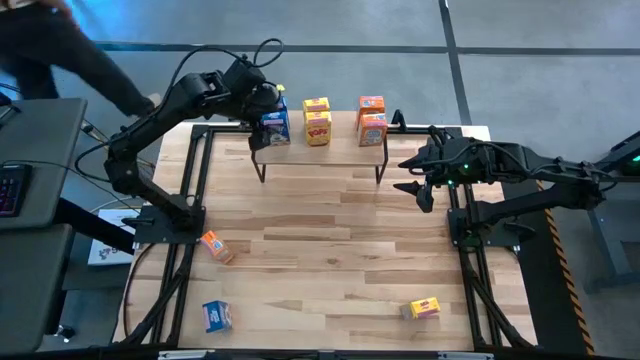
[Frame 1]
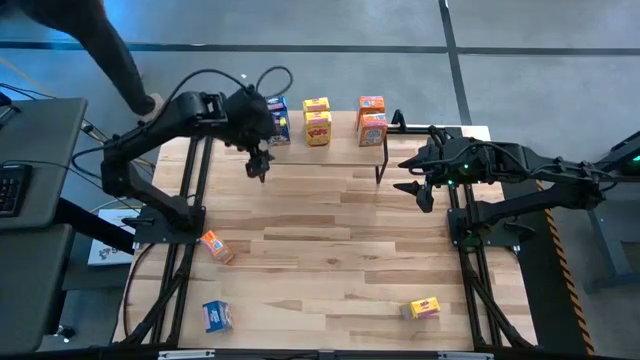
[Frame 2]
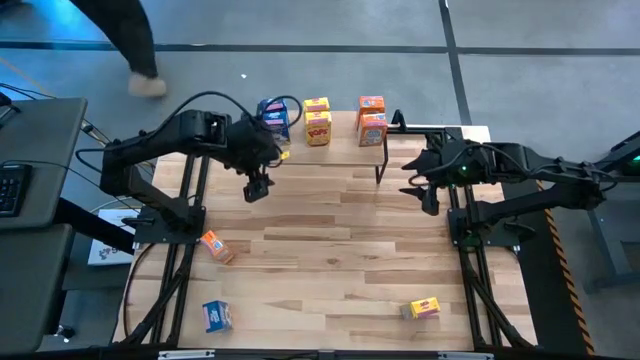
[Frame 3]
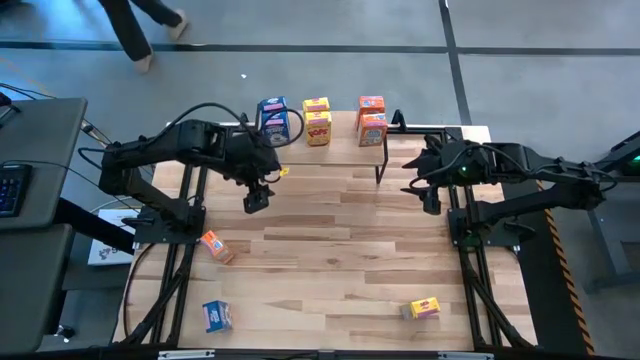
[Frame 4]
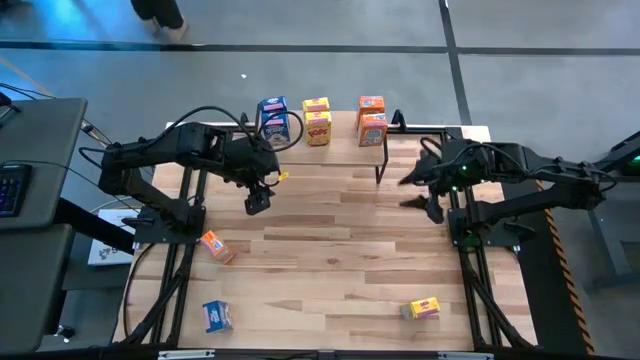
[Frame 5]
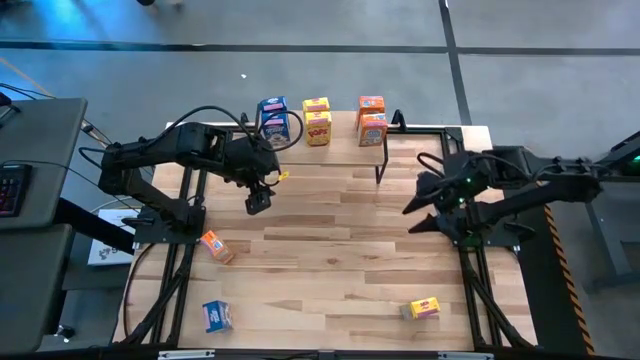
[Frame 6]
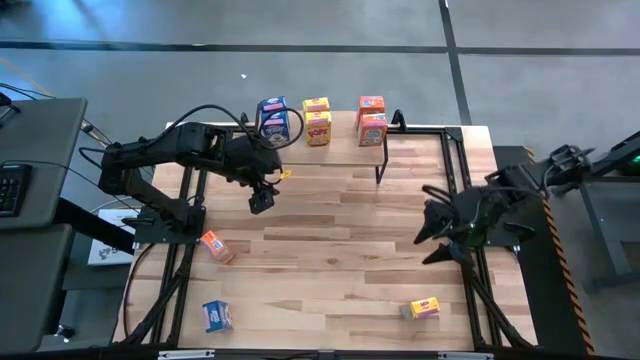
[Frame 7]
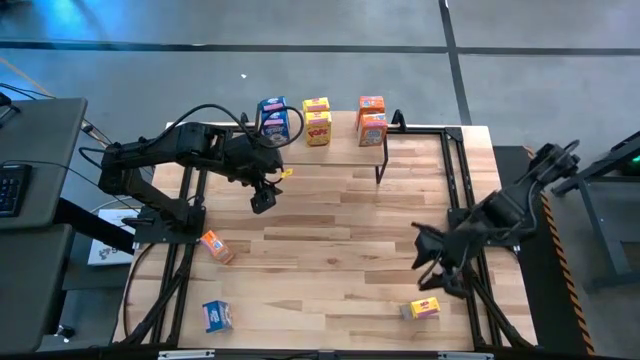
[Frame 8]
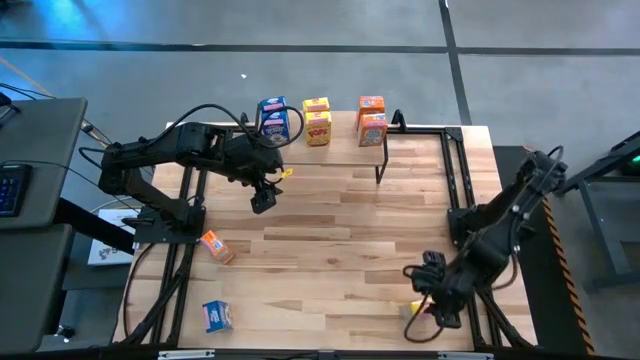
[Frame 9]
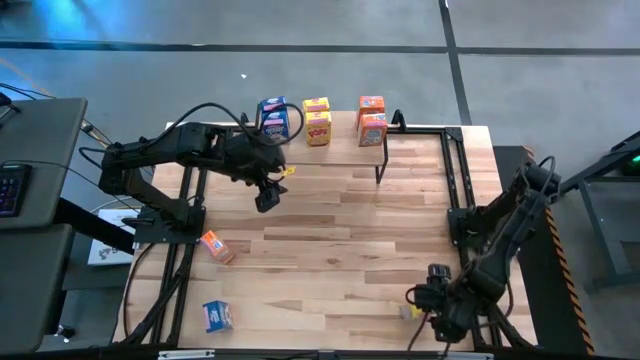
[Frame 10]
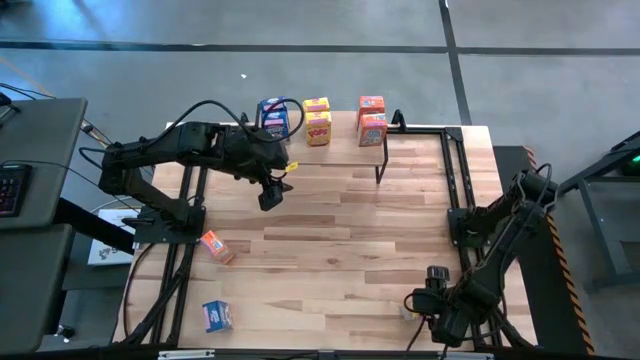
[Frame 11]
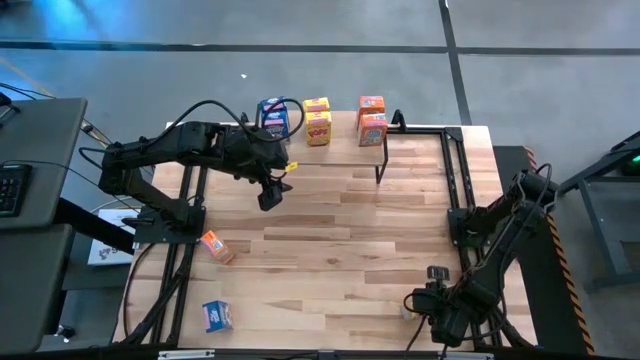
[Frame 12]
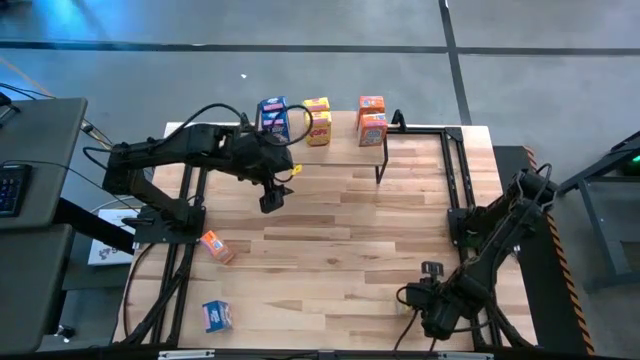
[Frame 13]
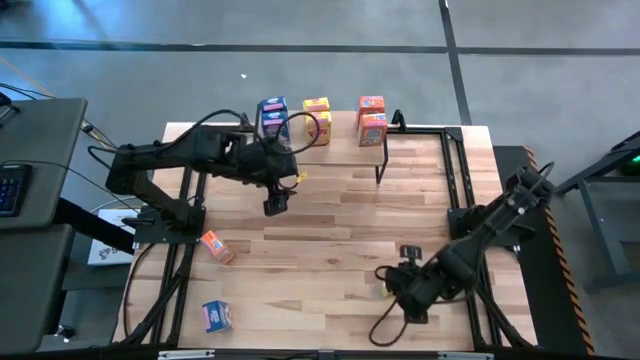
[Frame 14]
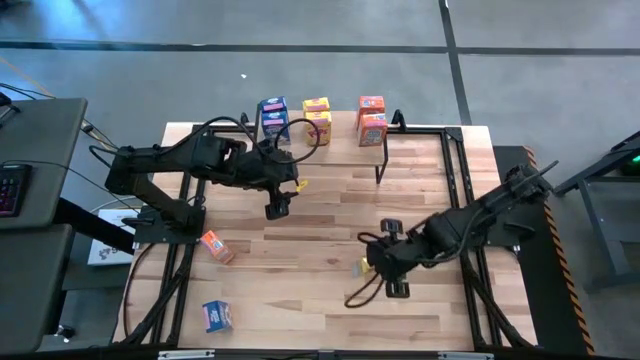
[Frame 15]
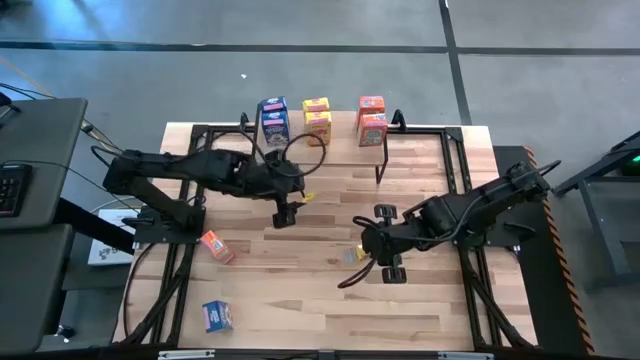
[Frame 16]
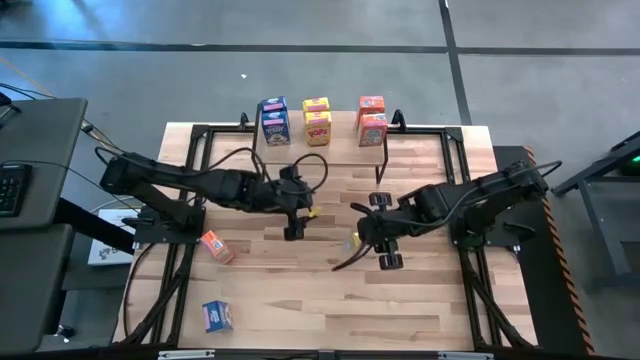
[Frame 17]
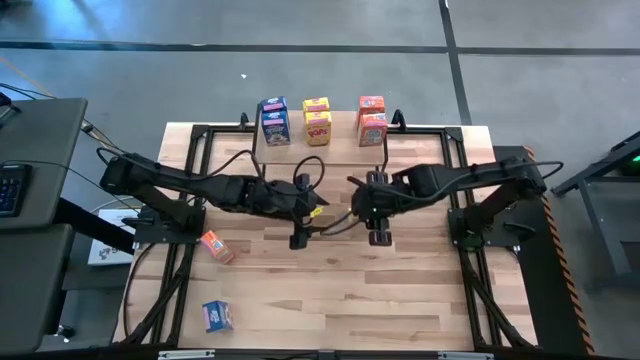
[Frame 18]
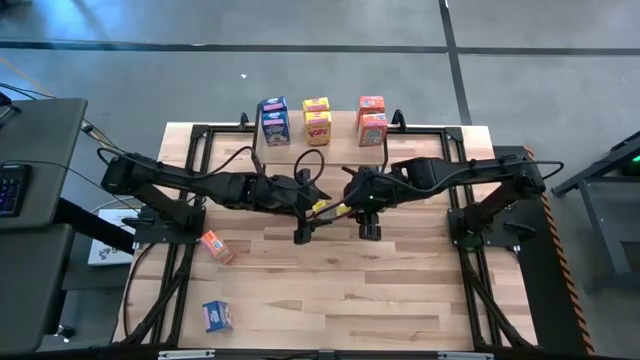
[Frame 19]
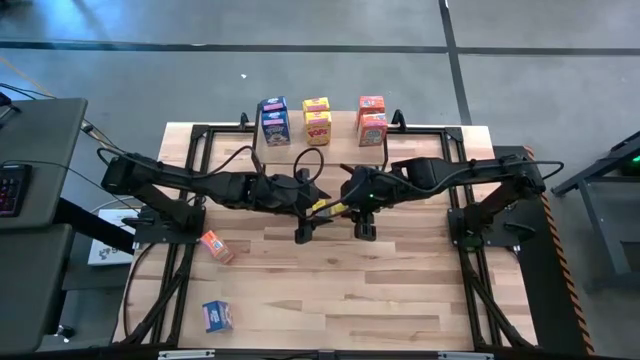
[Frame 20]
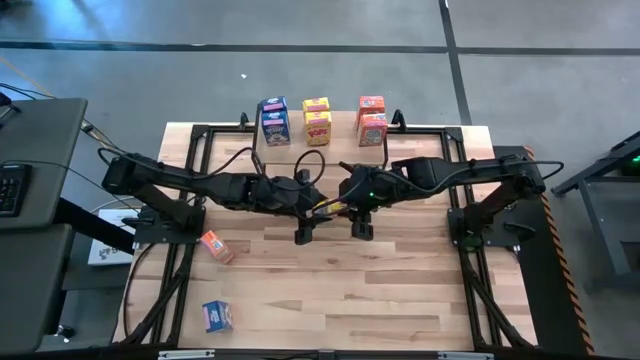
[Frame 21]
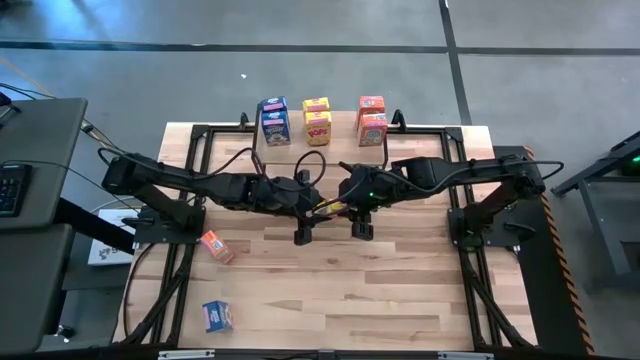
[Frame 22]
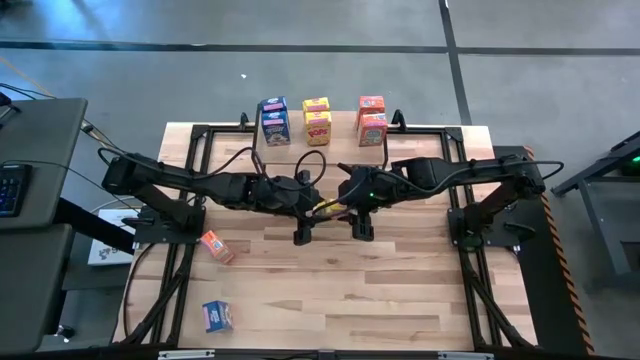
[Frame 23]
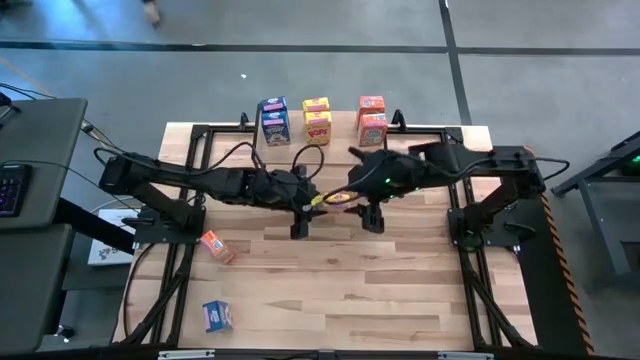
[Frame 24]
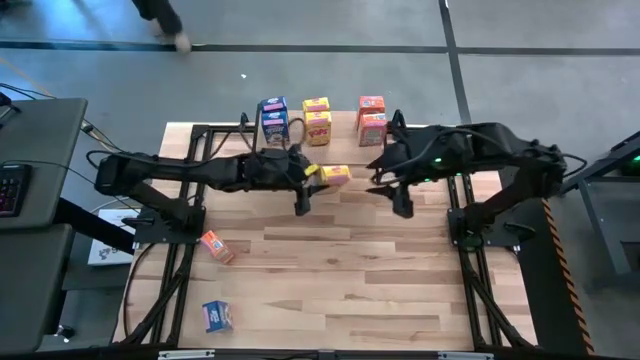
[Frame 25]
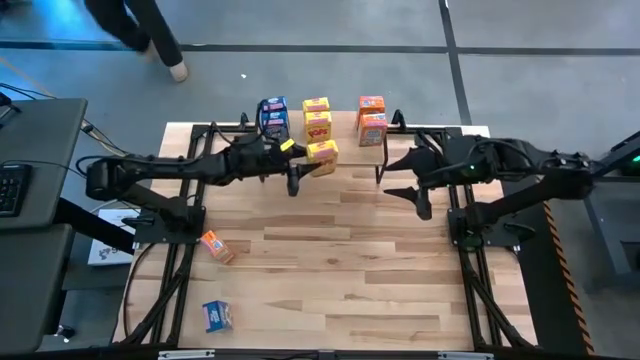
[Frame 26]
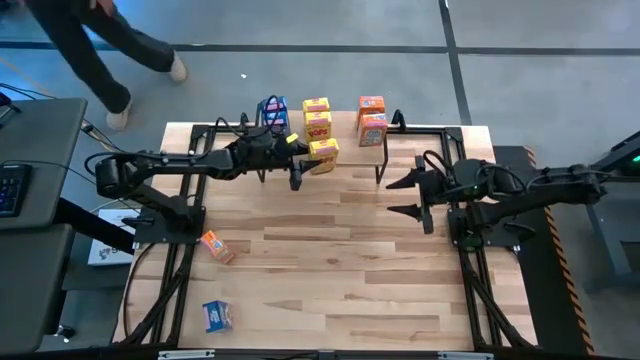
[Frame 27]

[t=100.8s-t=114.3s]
Task: Stack cereal on shelf
Put the yellow cereal box and aligned with the other yellow cereal boxes on the shelf

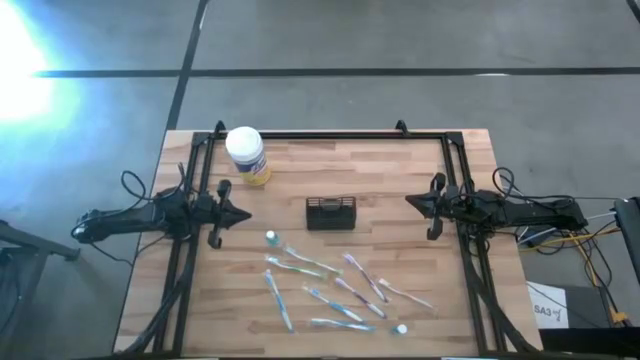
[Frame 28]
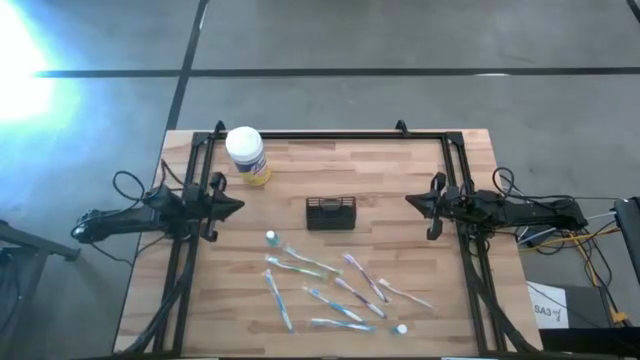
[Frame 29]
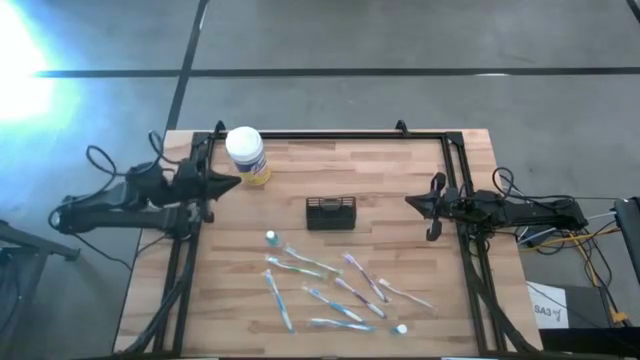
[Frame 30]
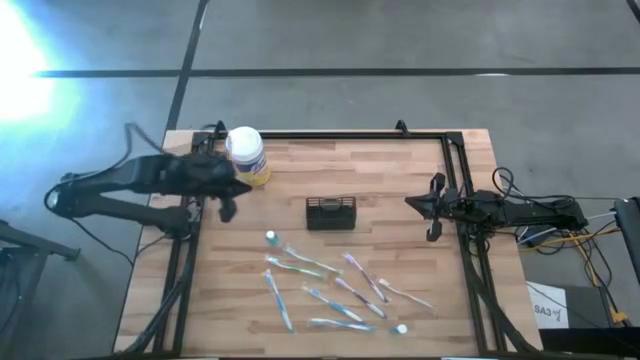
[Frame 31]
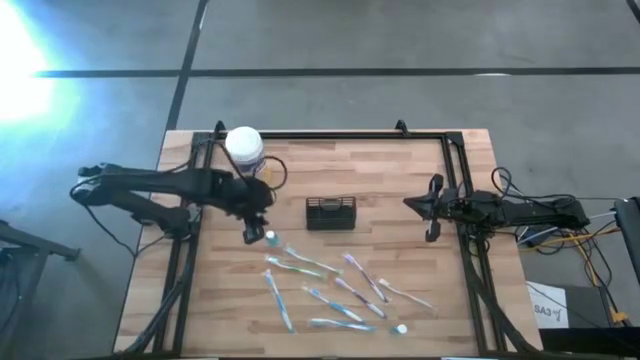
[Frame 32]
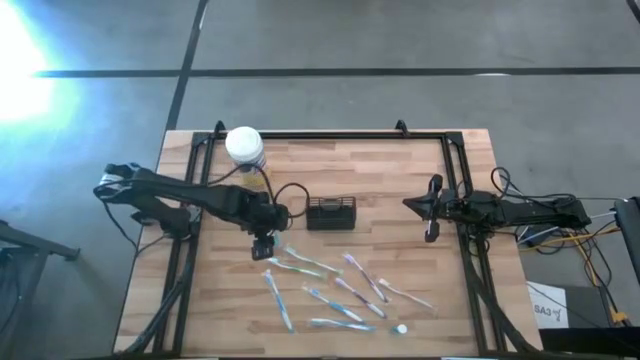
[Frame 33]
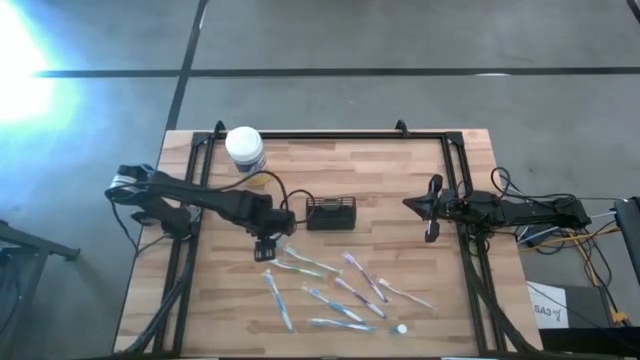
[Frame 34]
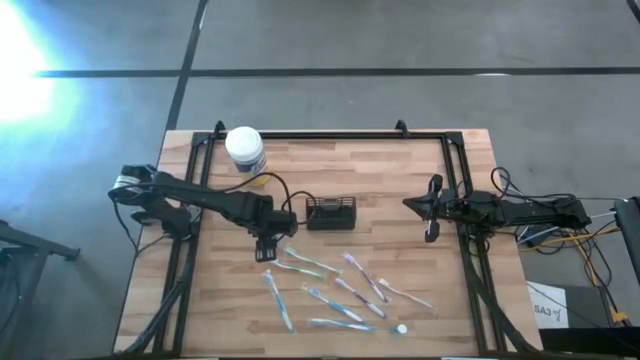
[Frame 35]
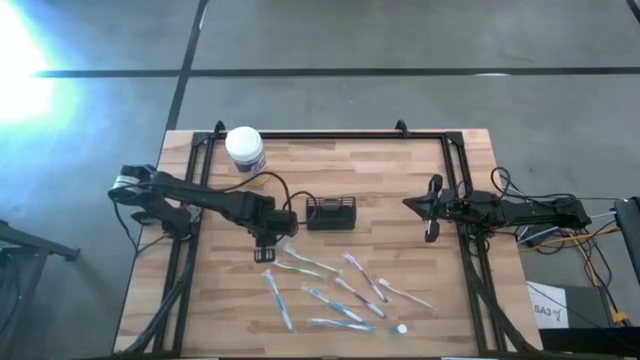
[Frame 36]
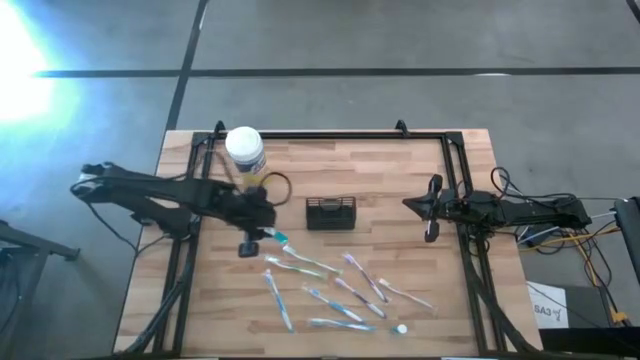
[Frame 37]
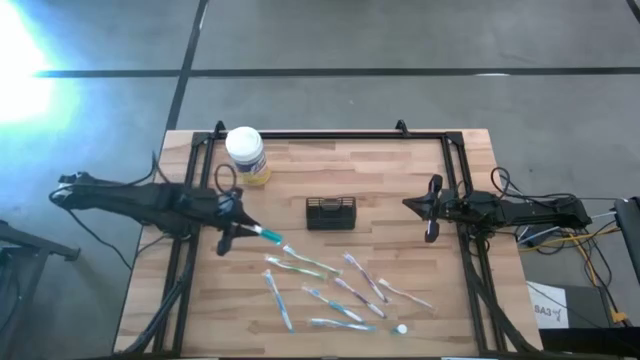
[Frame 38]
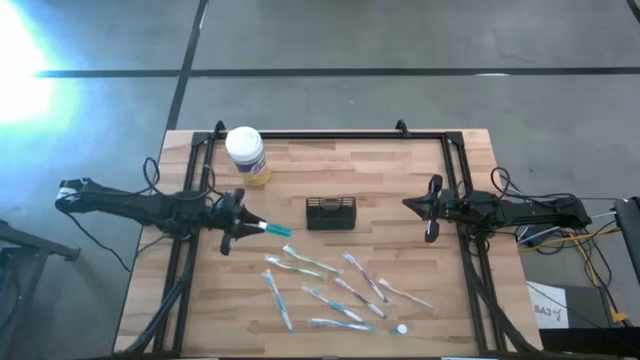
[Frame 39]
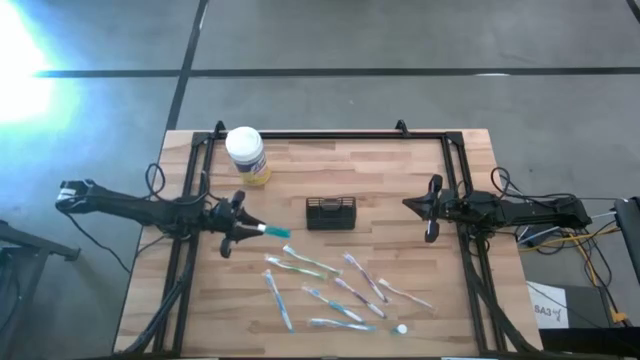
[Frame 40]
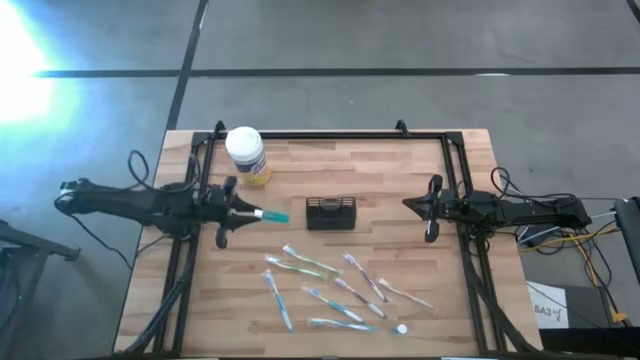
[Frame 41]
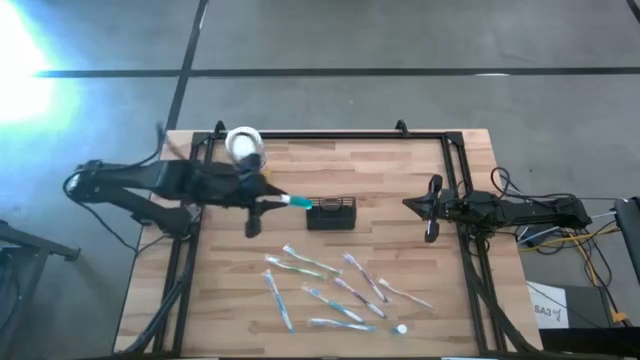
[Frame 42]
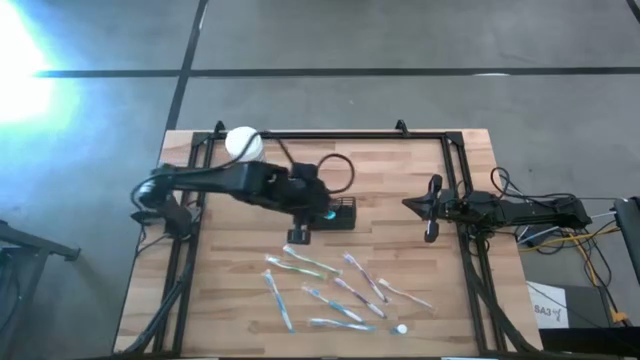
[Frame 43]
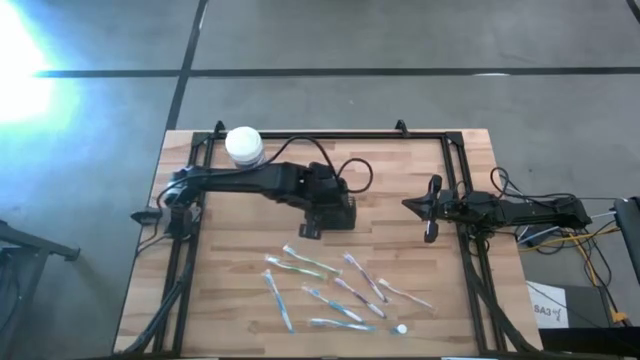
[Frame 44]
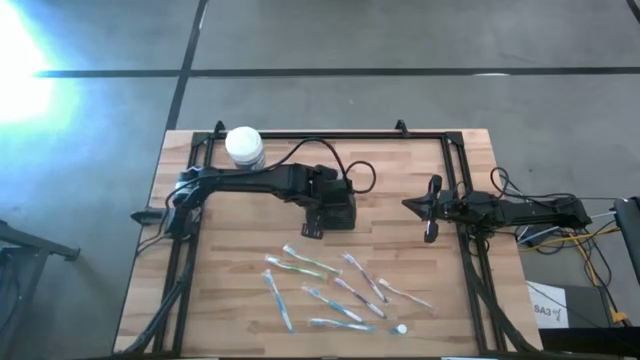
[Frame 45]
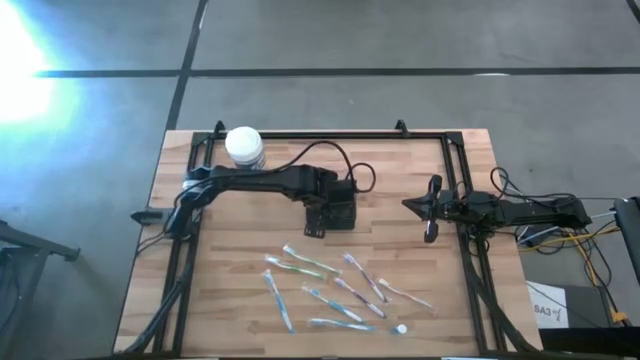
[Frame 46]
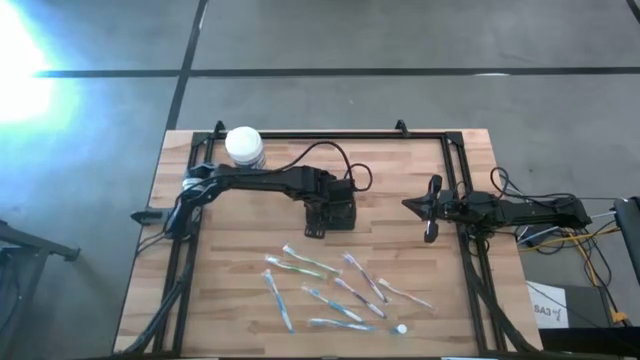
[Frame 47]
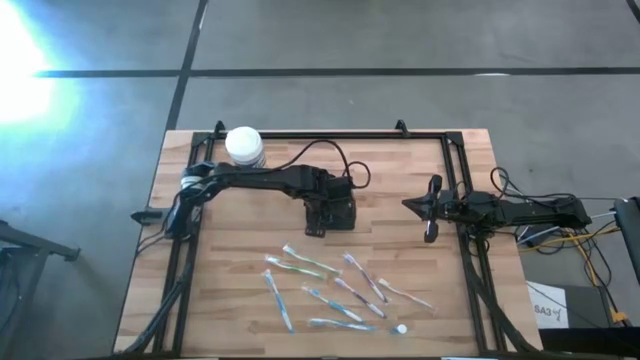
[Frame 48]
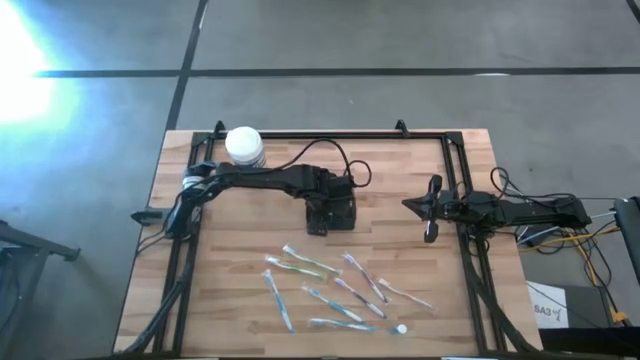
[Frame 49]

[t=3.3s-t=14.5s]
Task: Pick & Place toothbrushing station
Put the top blue mouthwash into the wire organizer
